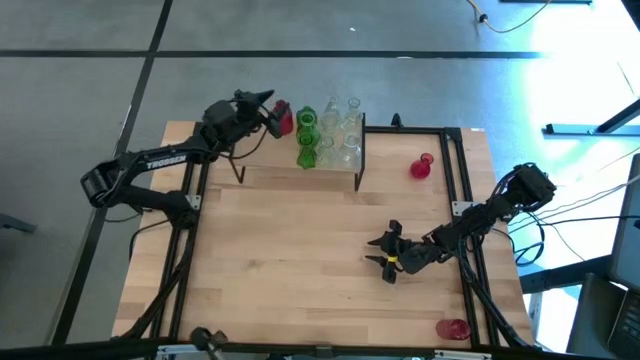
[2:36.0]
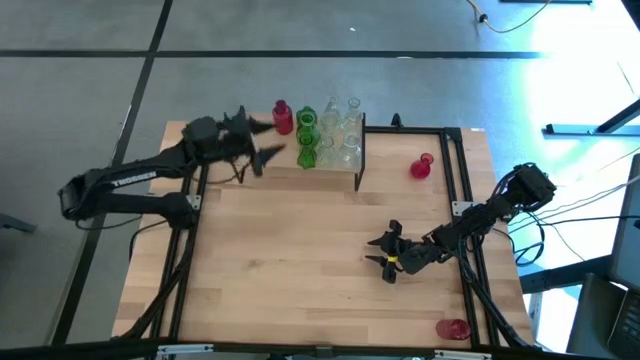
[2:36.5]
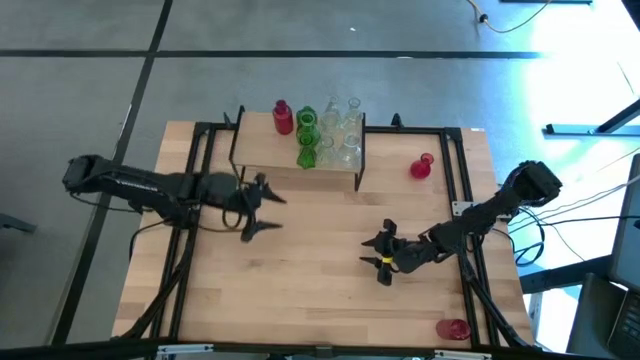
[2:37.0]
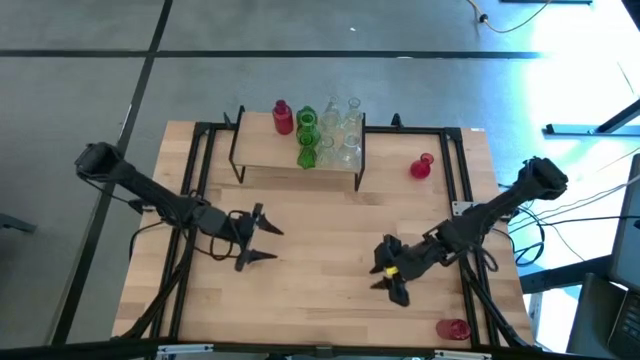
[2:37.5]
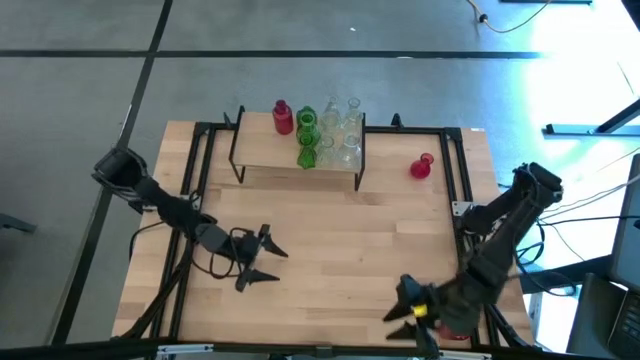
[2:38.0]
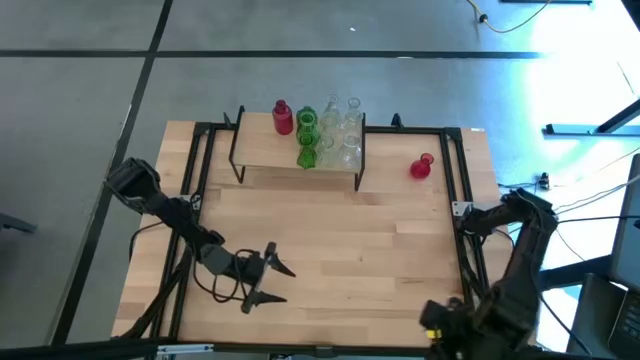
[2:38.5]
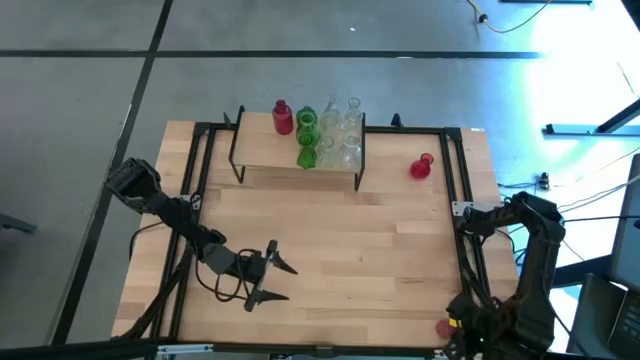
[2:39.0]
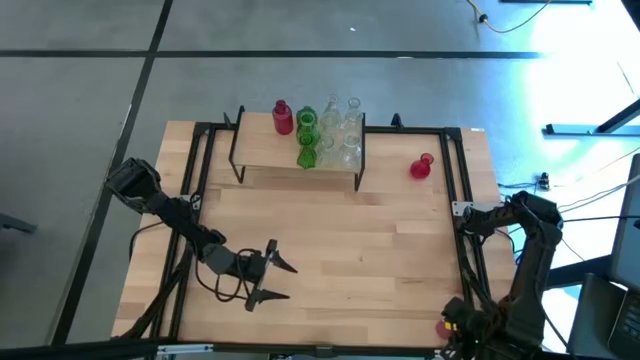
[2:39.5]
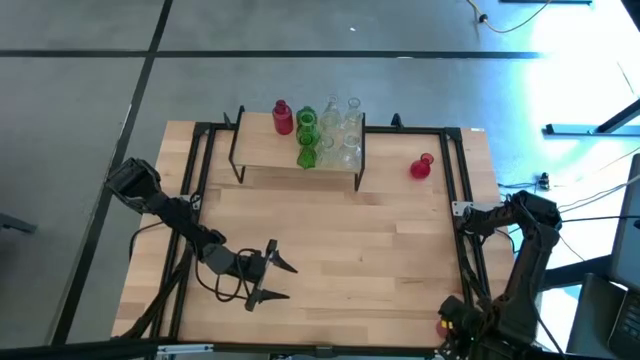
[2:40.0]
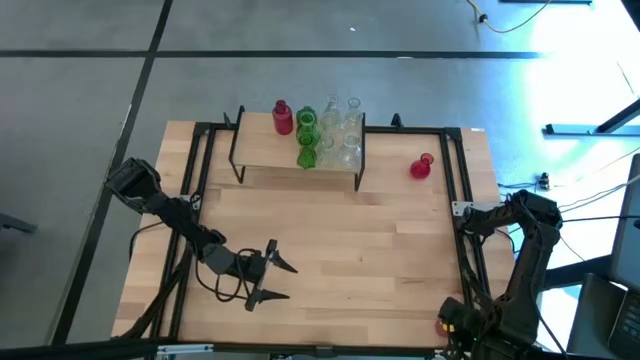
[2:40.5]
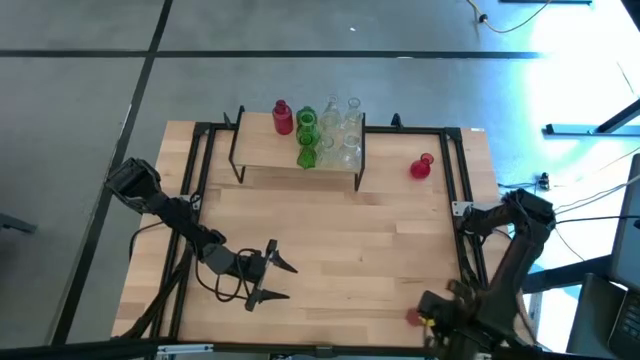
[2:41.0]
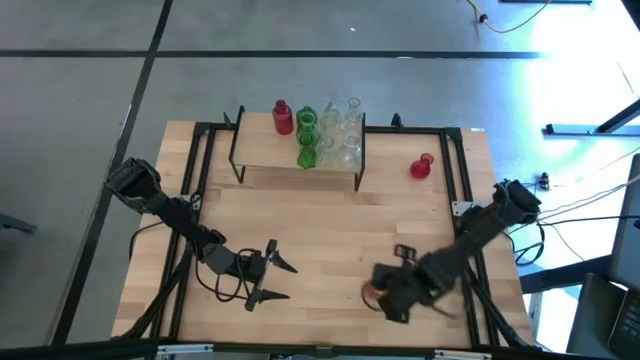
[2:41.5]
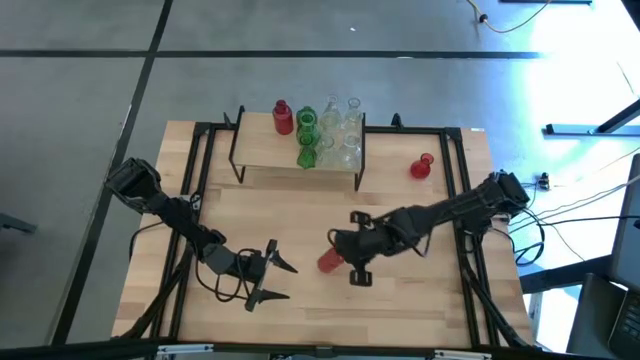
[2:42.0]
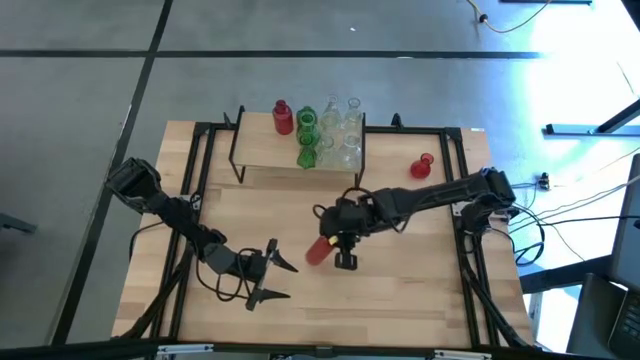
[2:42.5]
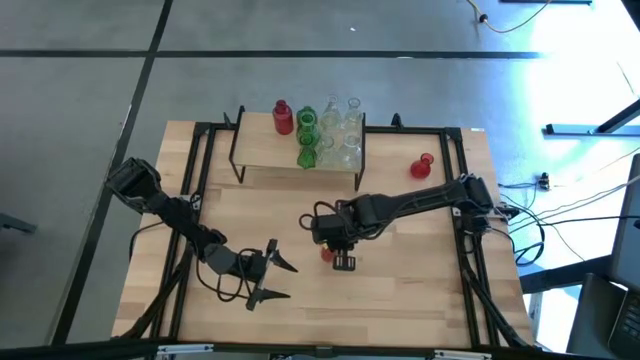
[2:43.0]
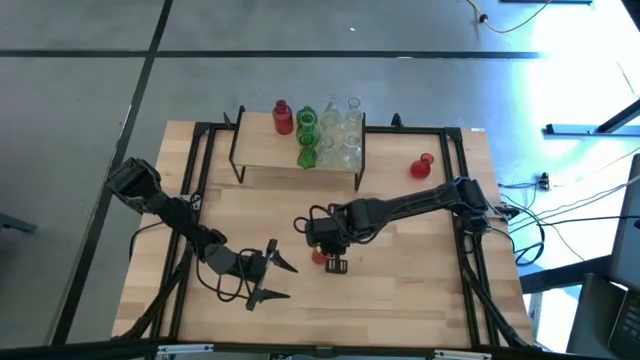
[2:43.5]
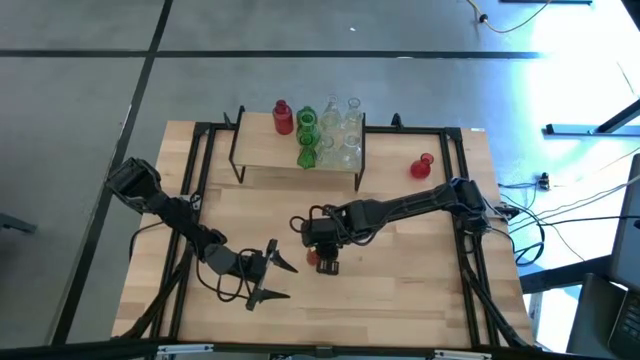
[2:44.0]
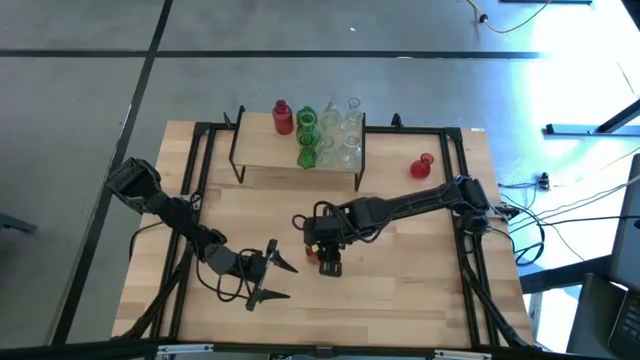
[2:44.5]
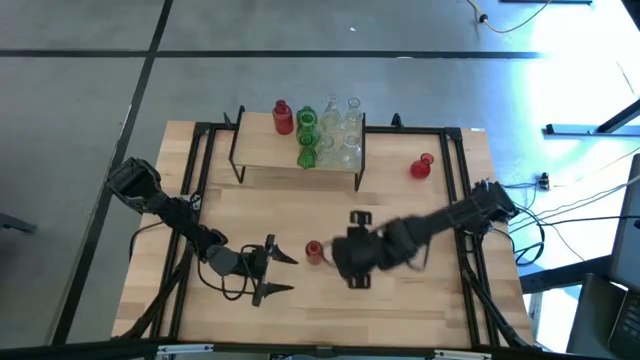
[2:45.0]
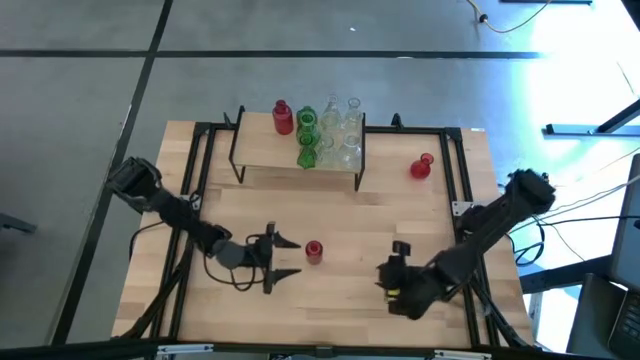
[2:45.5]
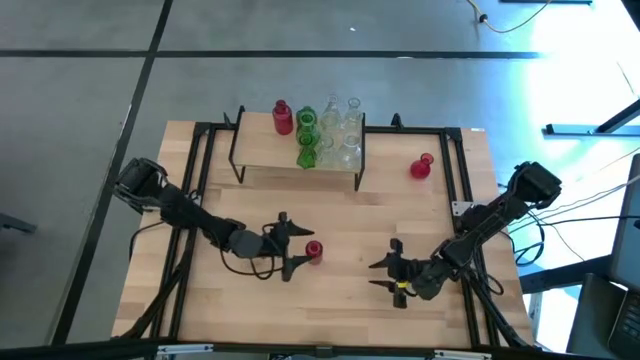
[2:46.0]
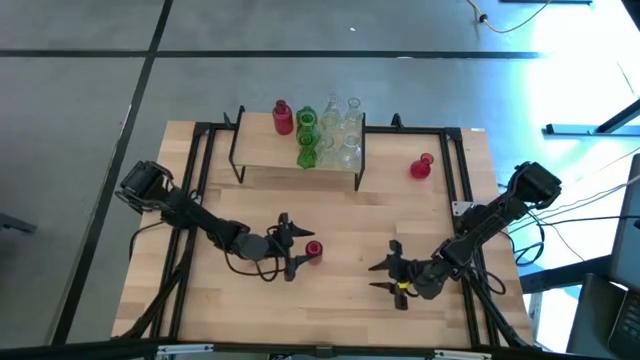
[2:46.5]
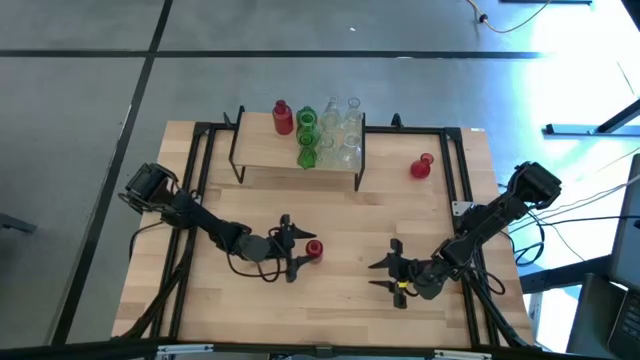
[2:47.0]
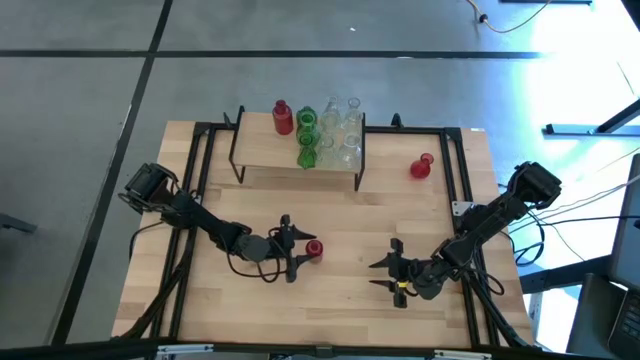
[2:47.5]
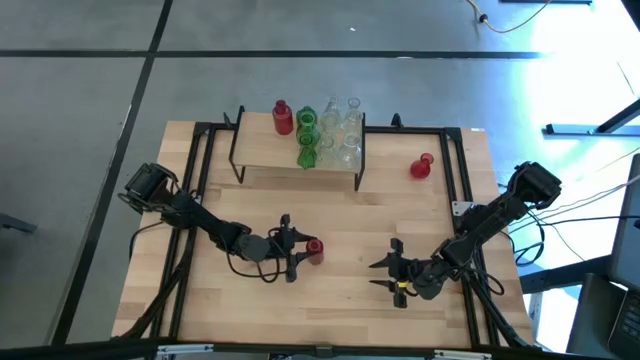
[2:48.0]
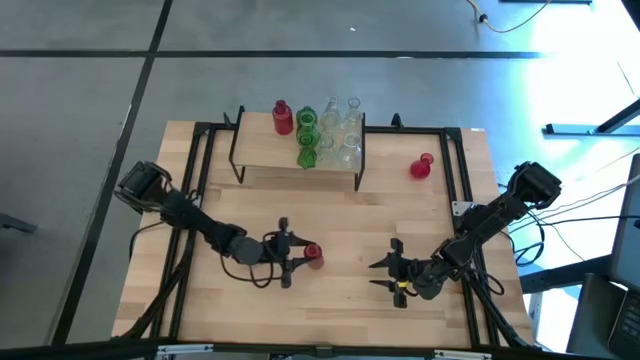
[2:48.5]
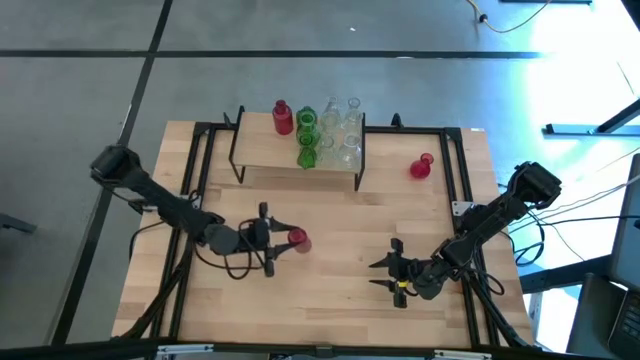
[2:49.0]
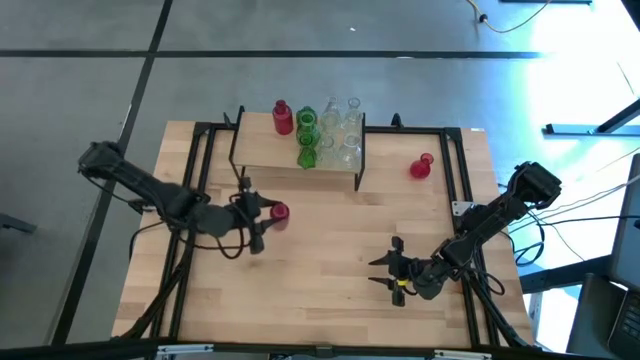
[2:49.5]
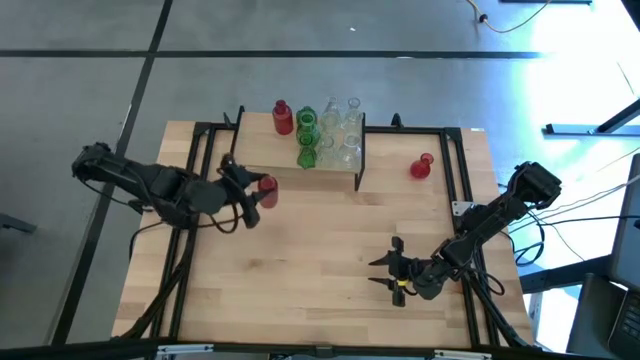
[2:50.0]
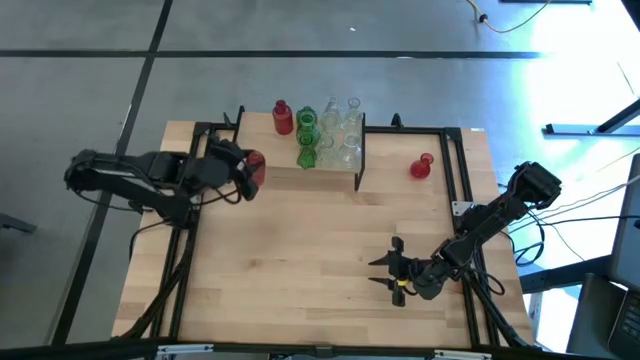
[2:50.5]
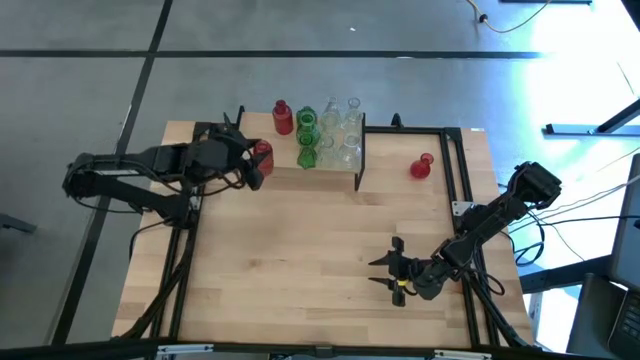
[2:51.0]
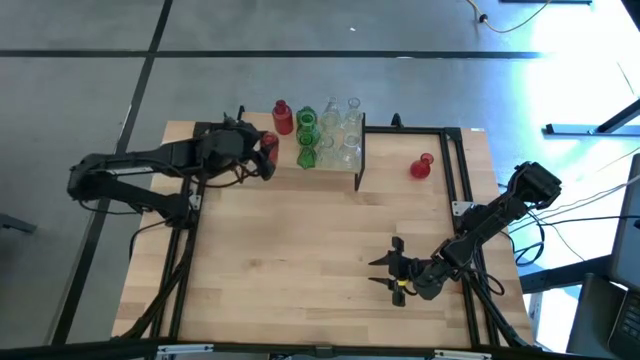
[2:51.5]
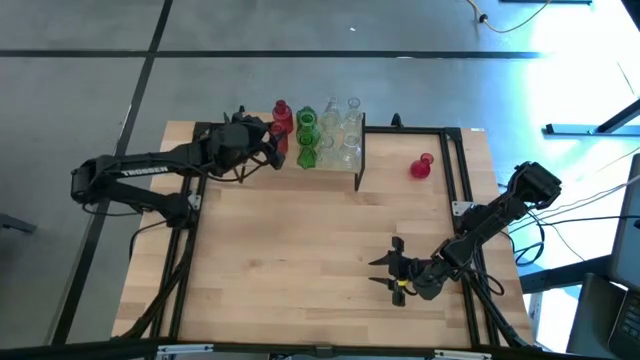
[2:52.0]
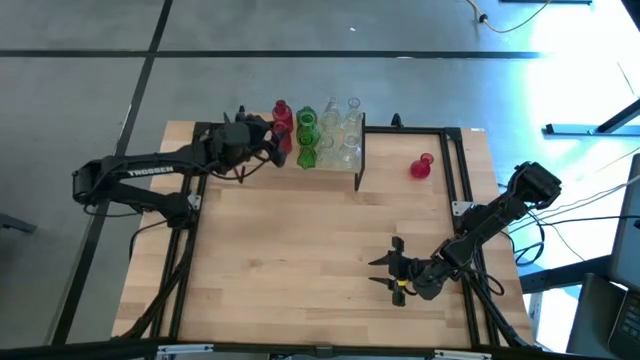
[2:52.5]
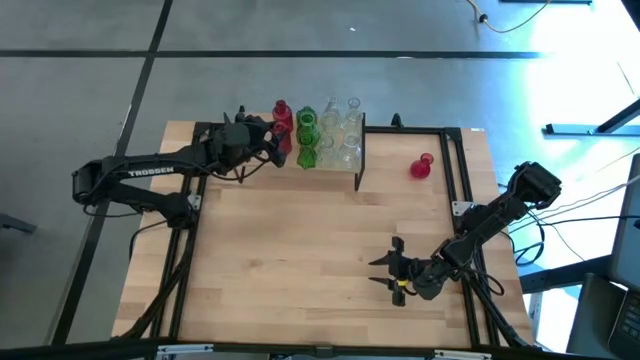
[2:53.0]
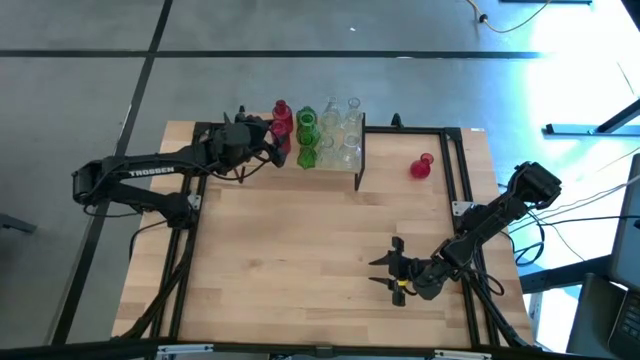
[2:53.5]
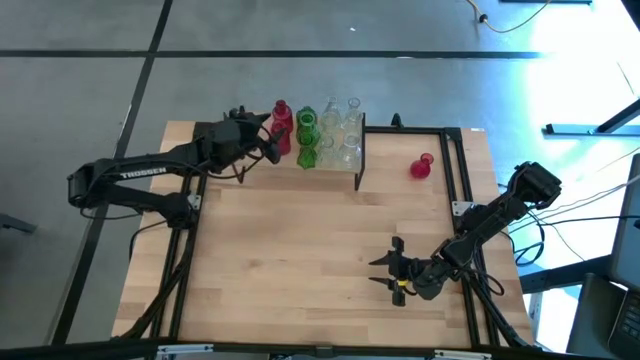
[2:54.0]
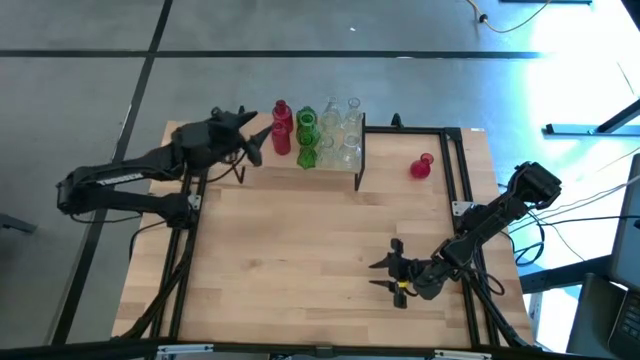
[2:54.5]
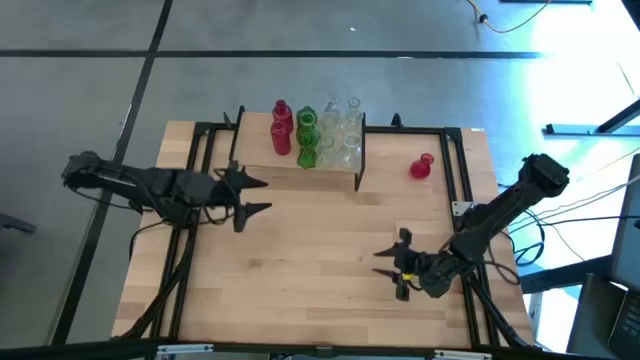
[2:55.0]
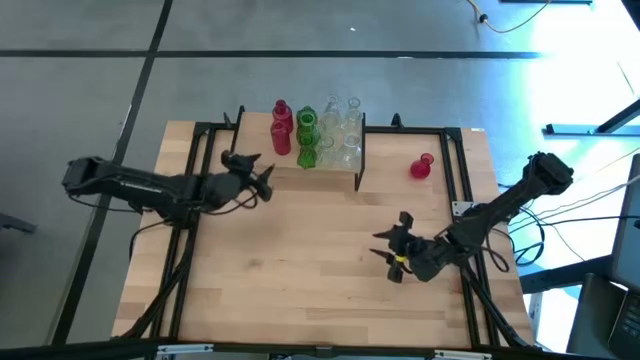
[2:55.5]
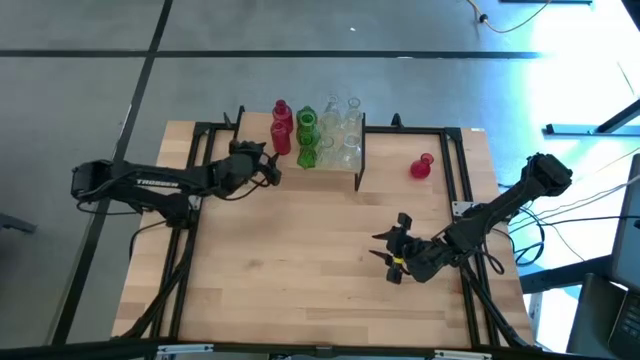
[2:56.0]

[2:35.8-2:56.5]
Task: sort vases onto shelf
Put the bottom red vase aligned with the other red vase on the shelf
